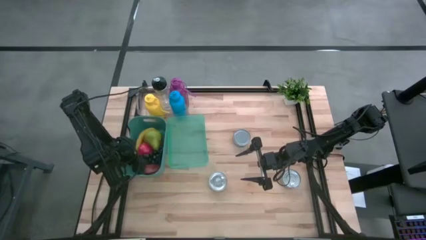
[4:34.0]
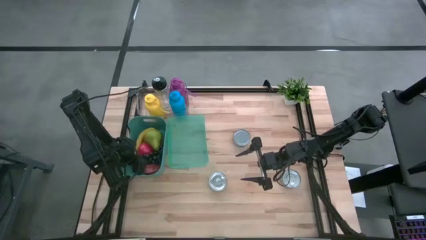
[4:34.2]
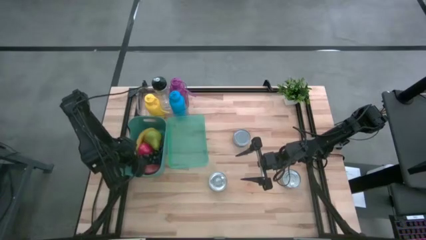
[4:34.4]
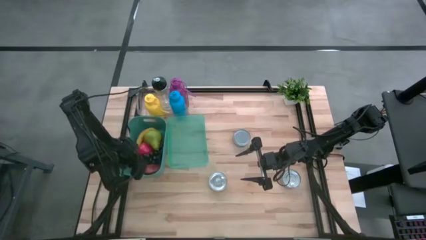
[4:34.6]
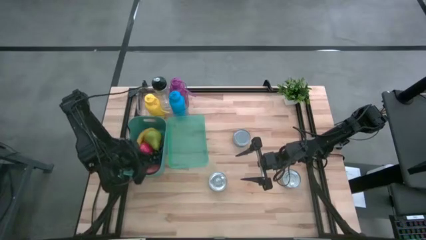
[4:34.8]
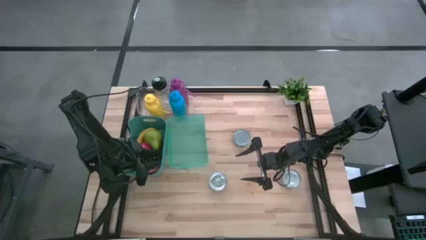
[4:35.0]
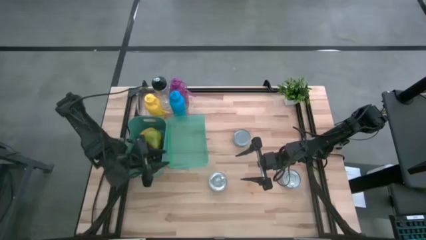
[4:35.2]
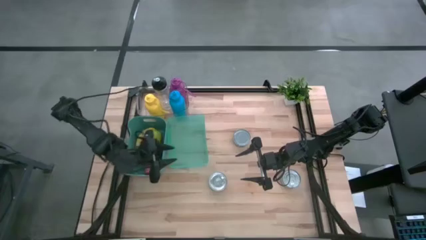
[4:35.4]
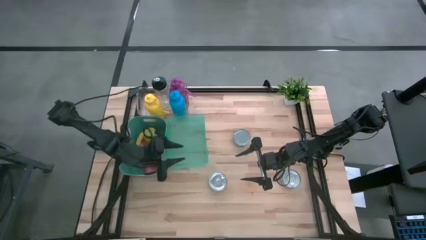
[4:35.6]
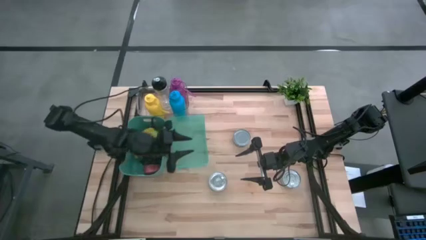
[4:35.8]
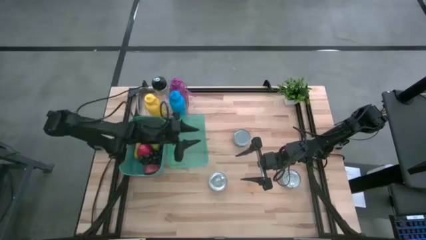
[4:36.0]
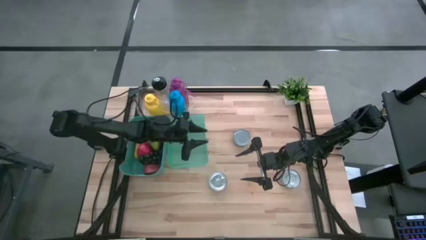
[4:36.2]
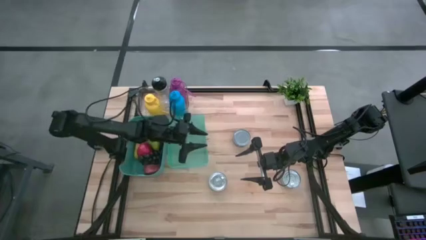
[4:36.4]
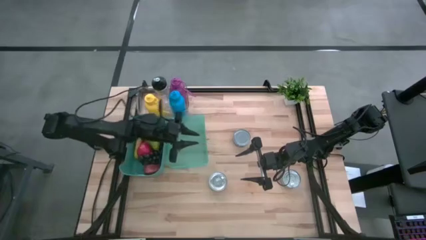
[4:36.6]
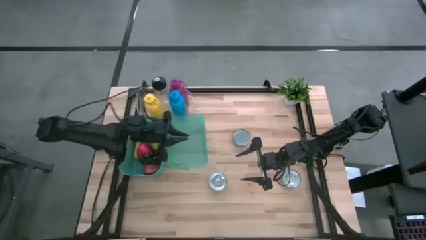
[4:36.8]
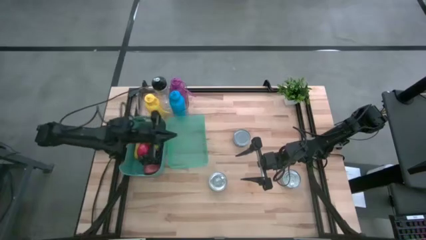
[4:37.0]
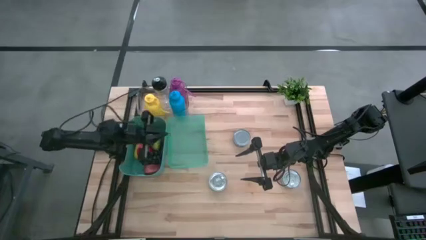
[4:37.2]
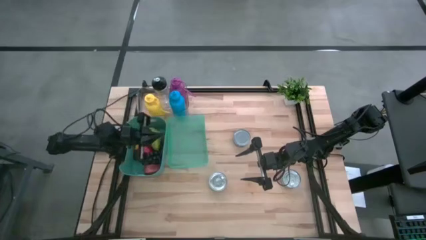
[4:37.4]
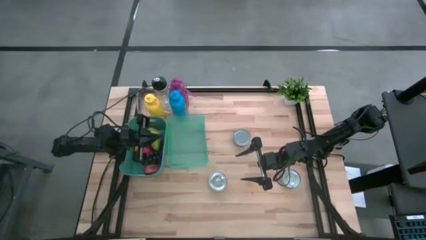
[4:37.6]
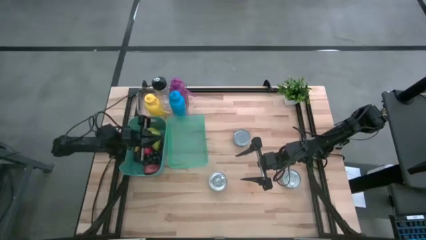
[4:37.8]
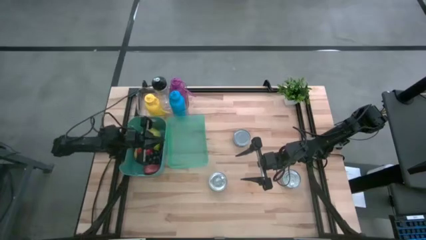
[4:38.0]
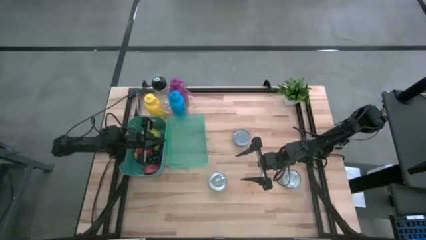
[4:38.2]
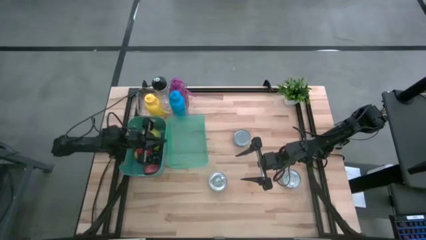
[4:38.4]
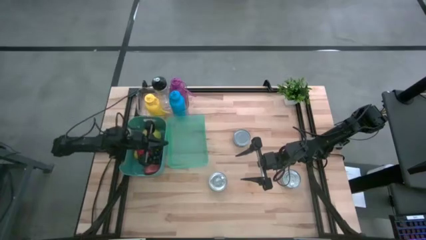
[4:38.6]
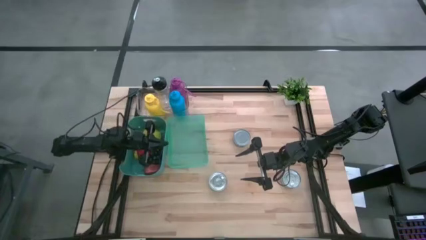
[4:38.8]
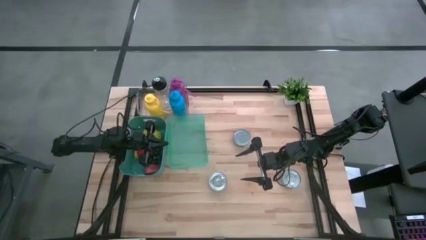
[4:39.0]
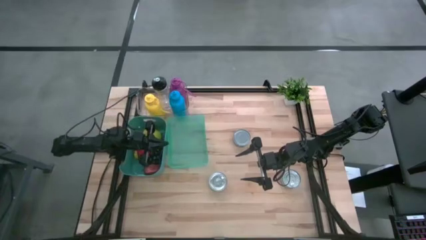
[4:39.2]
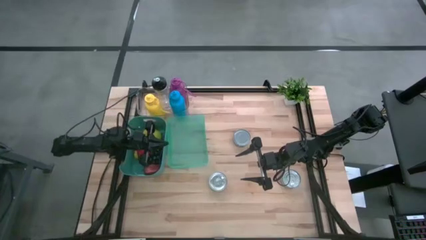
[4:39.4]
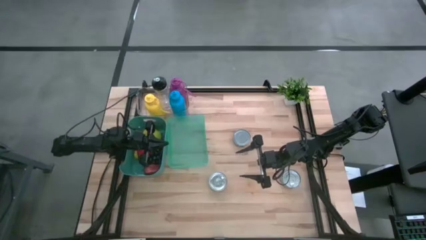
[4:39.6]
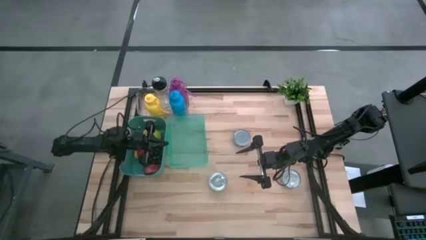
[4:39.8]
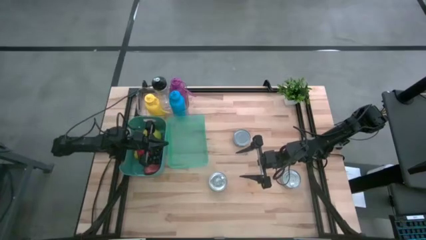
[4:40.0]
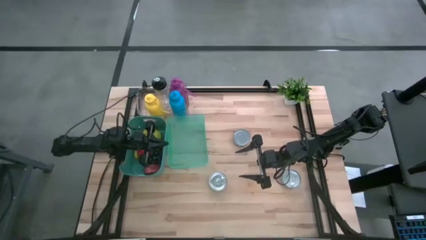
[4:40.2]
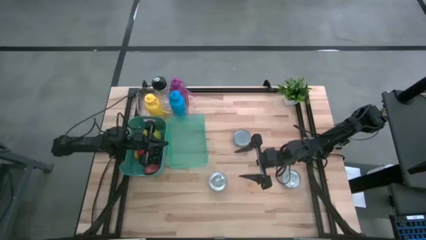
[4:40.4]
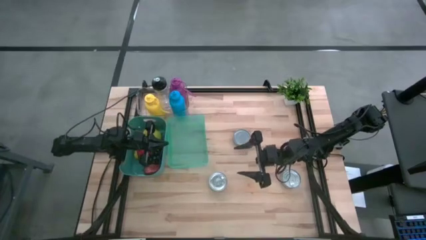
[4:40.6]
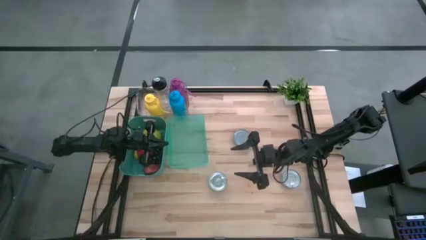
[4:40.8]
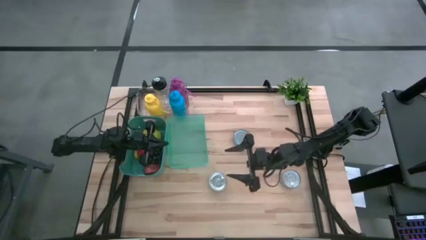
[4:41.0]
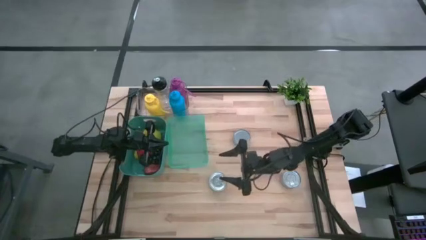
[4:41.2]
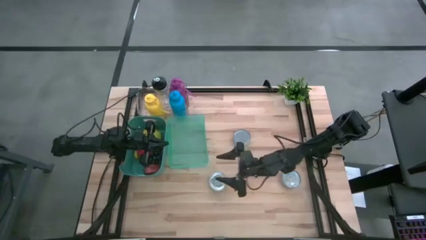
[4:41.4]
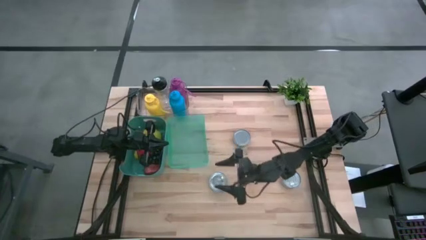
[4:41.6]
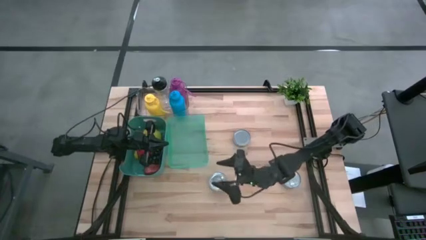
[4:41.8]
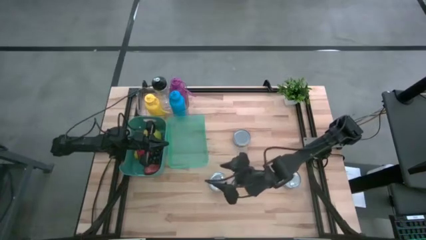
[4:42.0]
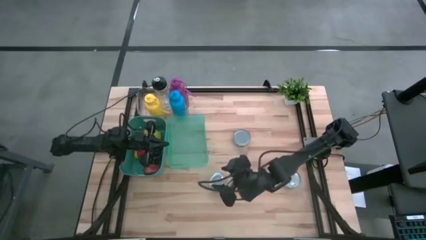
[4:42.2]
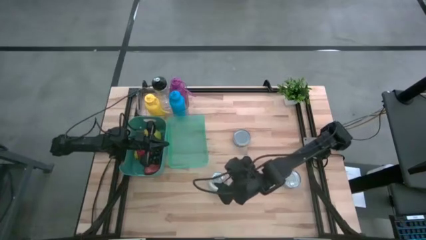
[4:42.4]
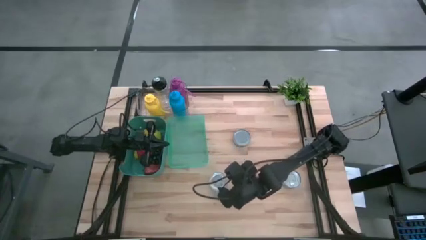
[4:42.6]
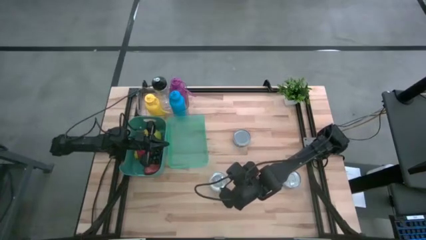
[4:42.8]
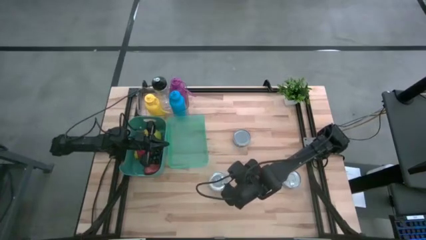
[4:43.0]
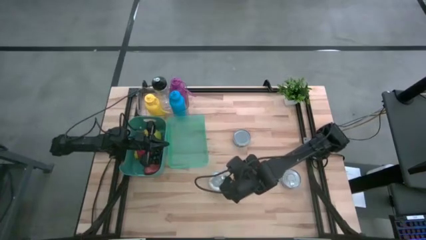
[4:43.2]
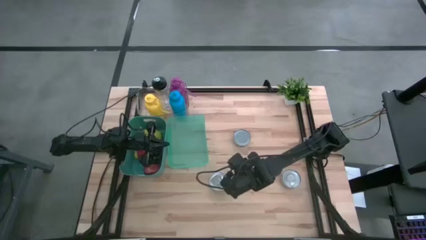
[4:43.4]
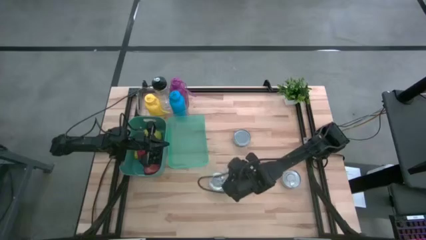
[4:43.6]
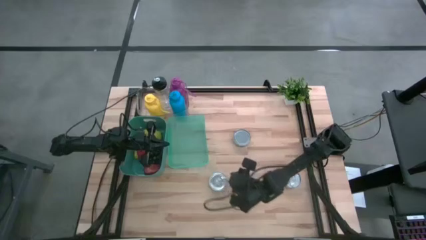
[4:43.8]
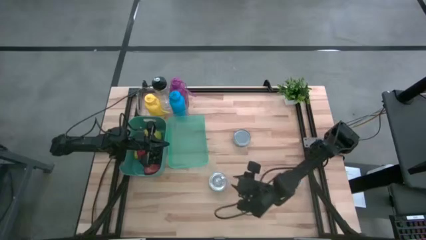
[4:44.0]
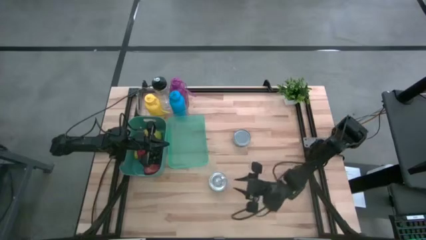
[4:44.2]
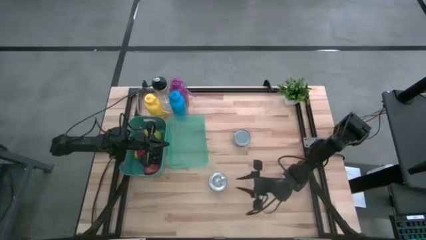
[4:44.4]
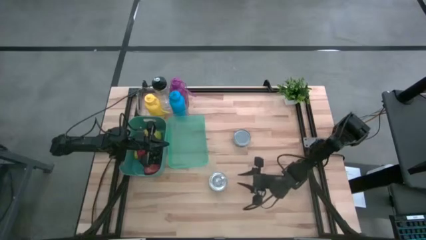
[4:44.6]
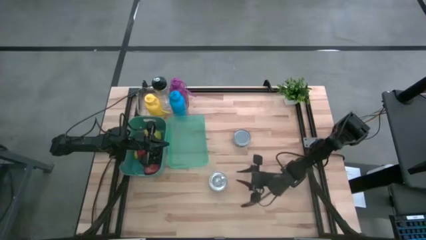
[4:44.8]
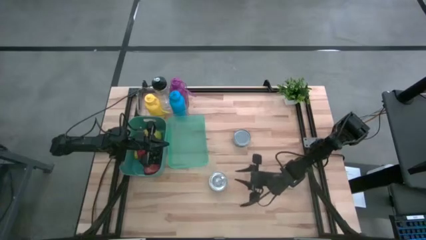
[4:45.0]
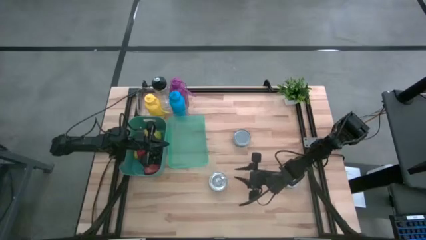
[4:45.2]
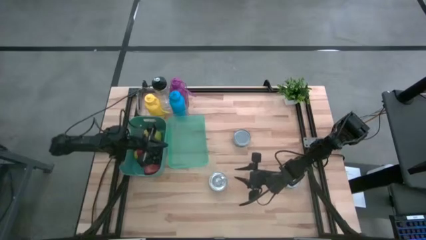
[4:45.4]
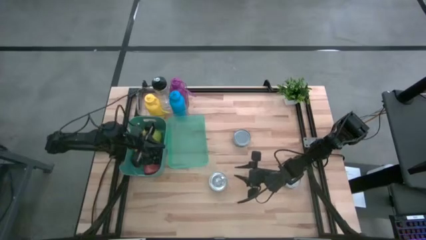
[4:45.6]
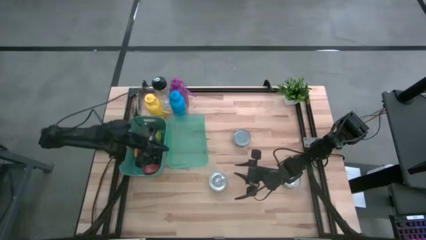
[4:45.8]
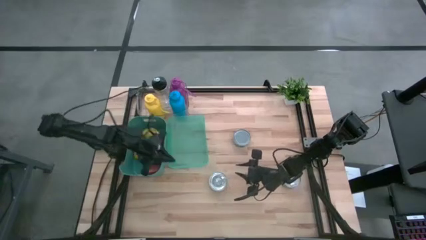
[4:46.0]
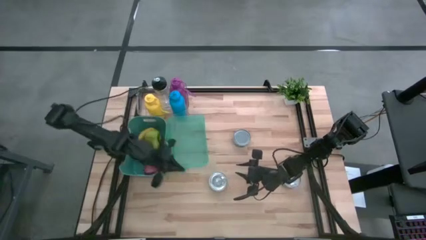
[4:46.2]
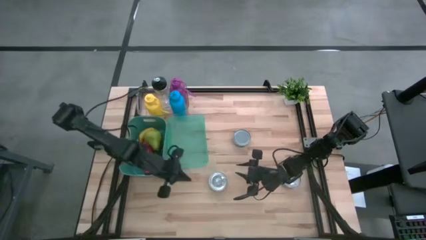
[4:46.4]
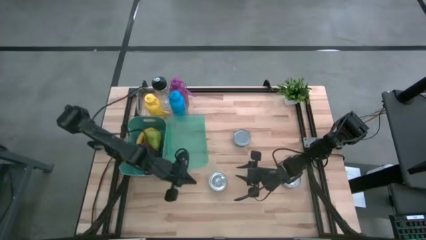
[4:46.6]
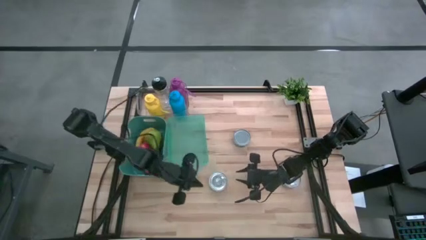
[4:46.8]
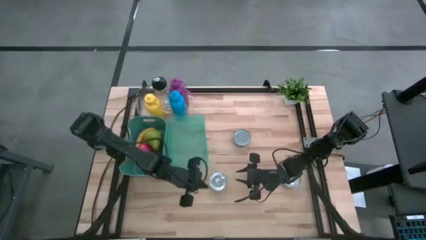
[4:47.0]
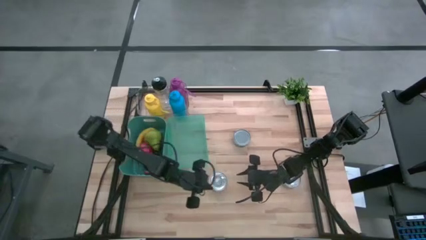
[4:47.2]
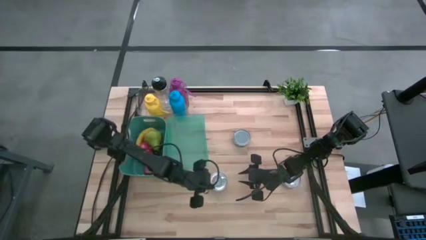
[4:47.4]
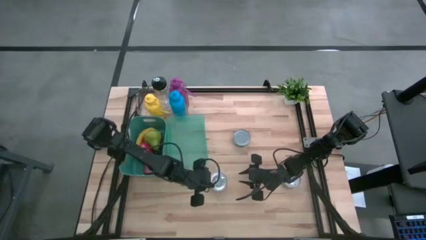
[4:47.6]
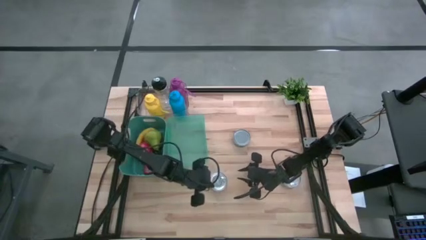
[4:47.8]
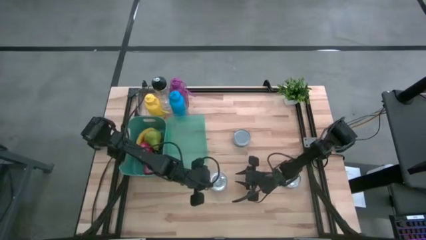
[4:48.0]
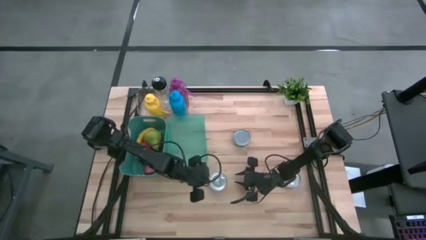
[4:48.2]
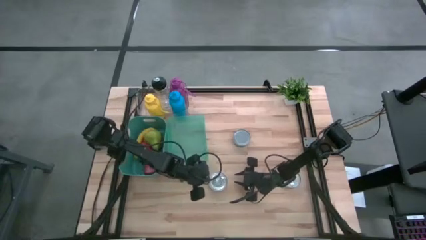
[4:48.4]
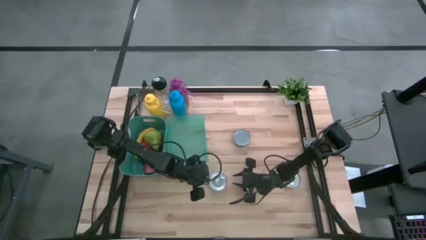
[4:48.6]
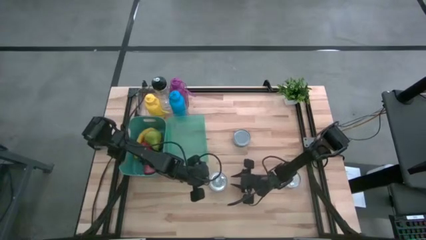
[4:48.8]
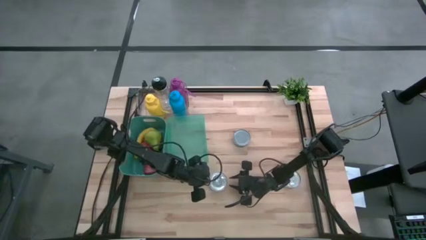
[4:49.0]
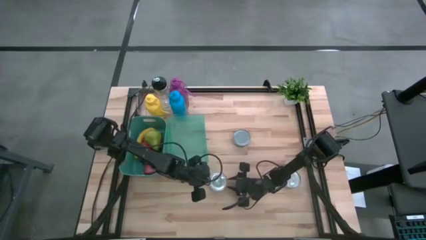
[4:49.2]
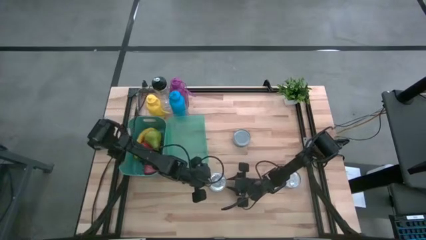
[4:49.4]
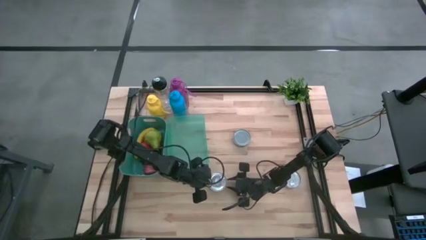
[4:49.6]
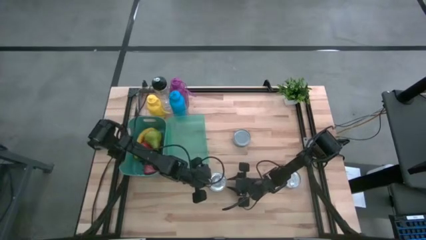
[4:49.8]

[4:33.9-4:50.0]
Task: Pick & Place Food Item
Put the bottom green tuna can into the light green bin
